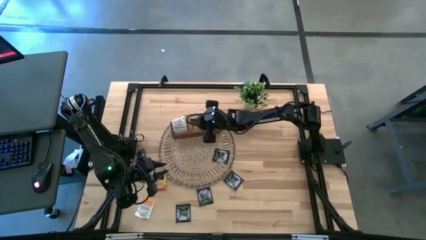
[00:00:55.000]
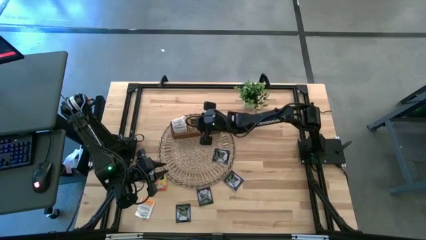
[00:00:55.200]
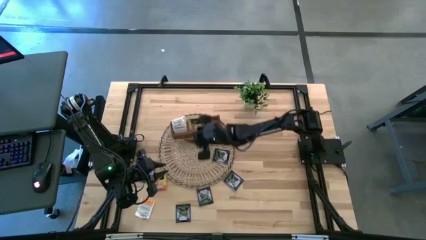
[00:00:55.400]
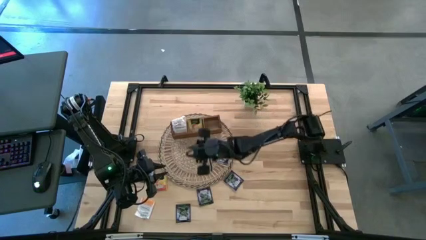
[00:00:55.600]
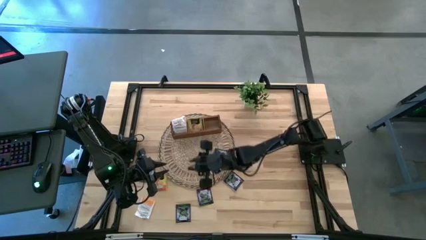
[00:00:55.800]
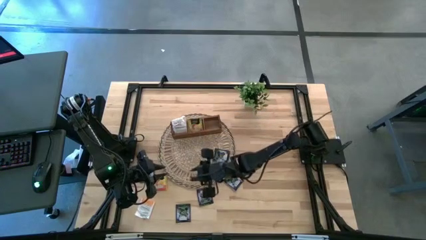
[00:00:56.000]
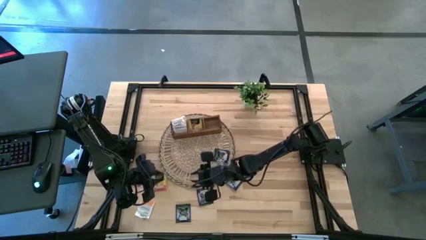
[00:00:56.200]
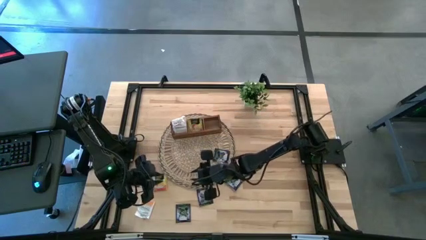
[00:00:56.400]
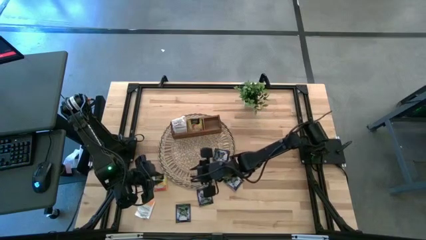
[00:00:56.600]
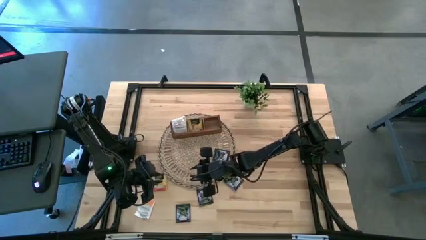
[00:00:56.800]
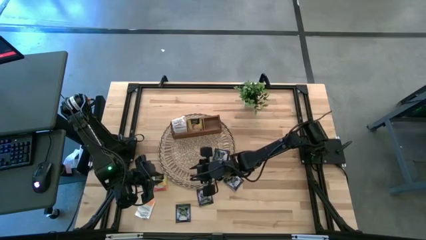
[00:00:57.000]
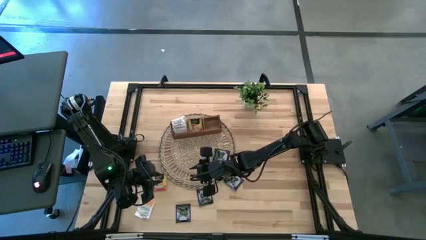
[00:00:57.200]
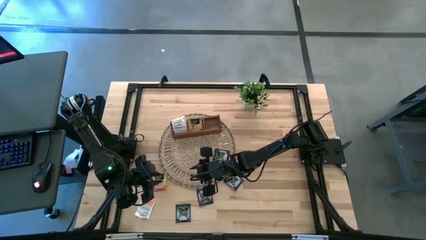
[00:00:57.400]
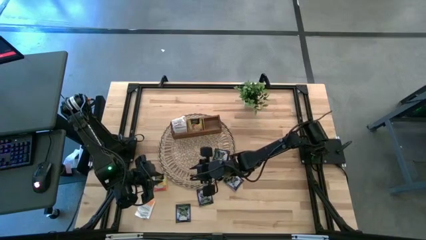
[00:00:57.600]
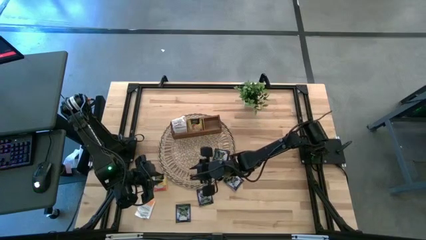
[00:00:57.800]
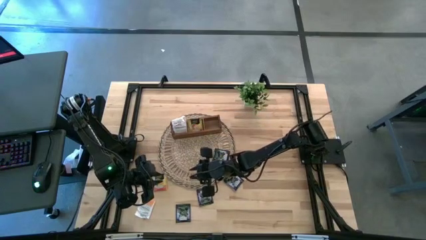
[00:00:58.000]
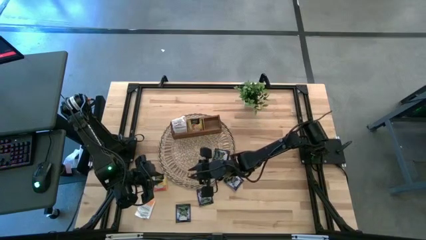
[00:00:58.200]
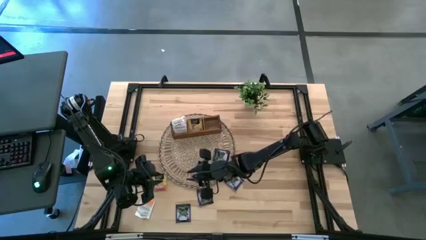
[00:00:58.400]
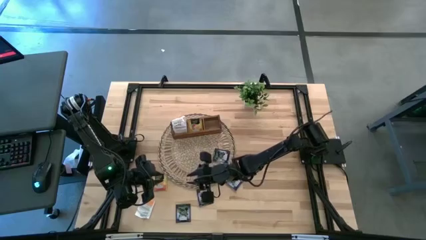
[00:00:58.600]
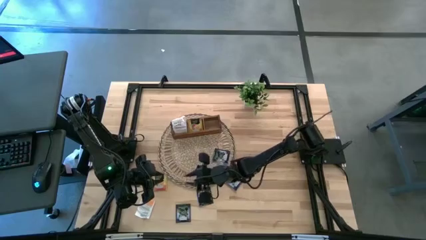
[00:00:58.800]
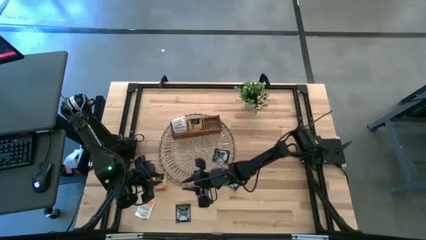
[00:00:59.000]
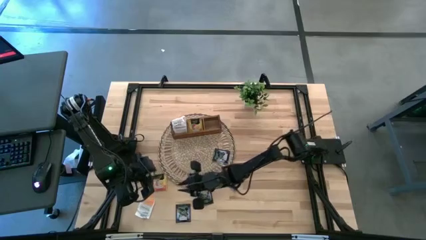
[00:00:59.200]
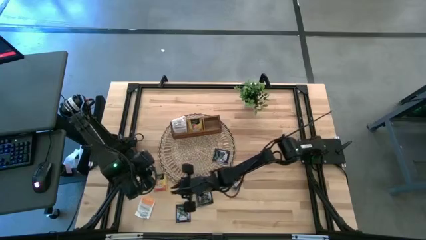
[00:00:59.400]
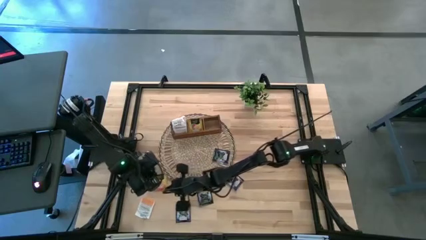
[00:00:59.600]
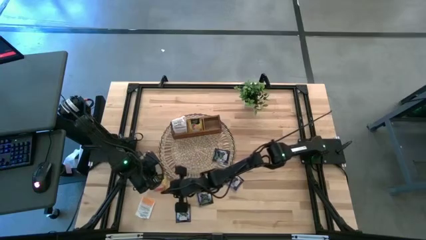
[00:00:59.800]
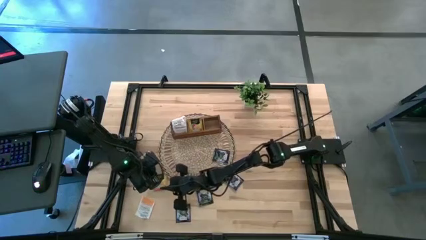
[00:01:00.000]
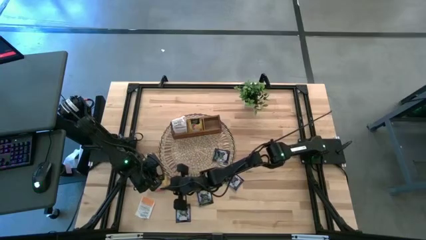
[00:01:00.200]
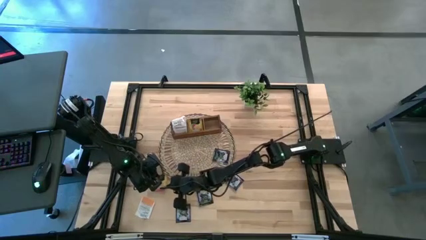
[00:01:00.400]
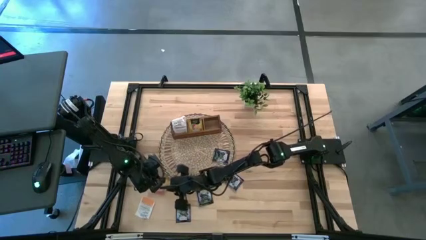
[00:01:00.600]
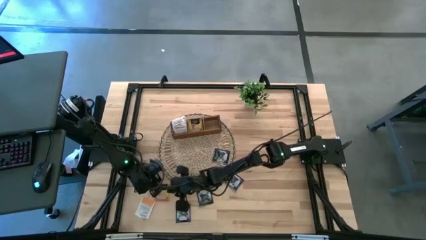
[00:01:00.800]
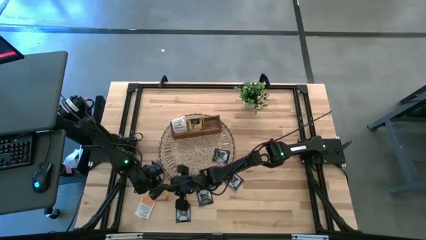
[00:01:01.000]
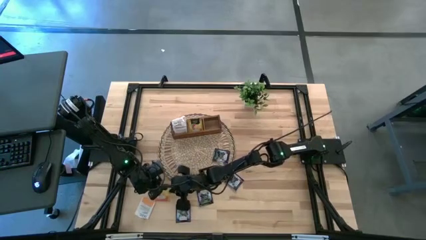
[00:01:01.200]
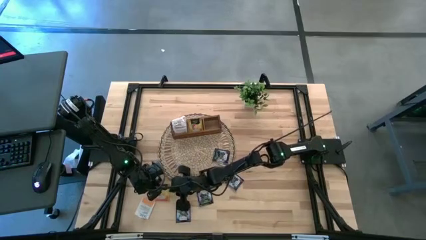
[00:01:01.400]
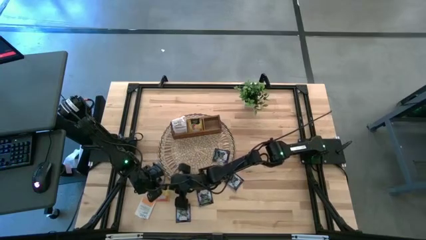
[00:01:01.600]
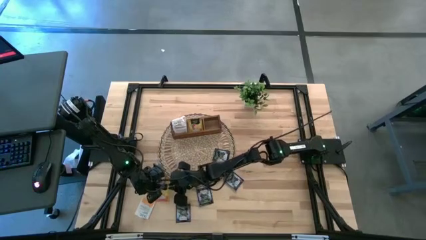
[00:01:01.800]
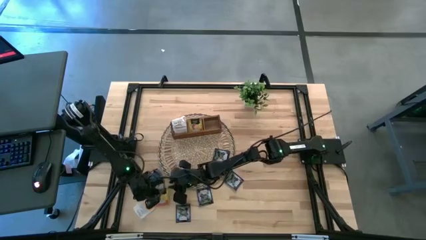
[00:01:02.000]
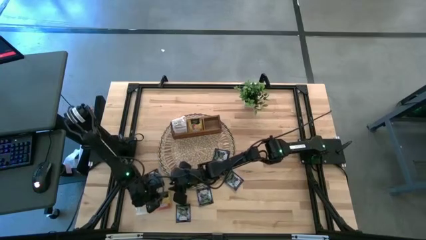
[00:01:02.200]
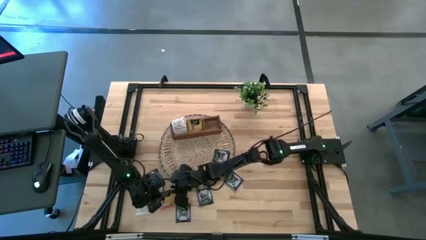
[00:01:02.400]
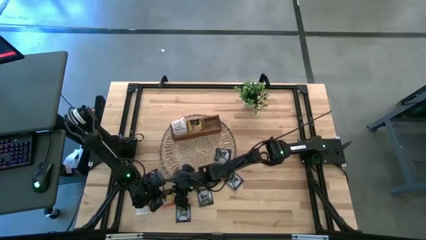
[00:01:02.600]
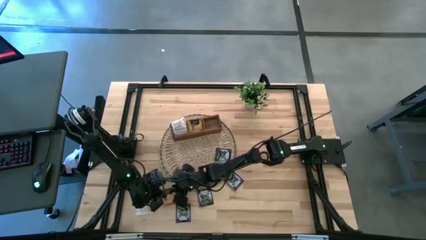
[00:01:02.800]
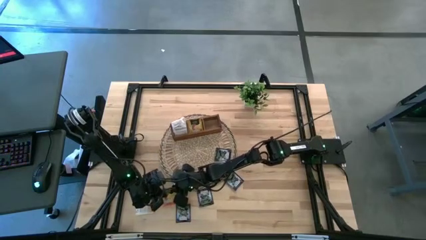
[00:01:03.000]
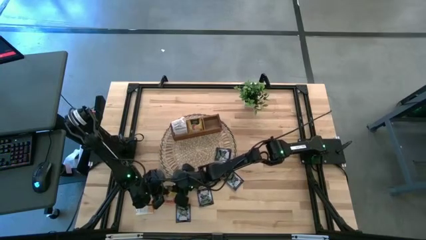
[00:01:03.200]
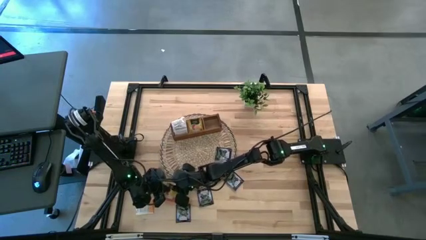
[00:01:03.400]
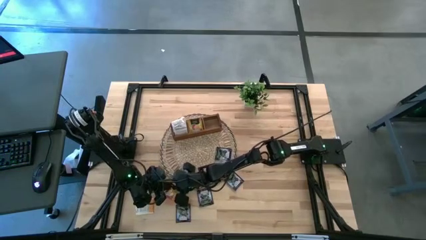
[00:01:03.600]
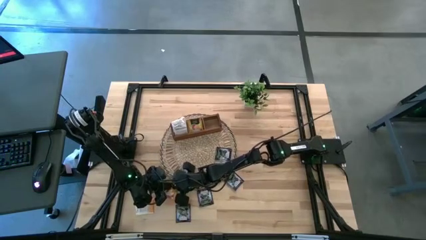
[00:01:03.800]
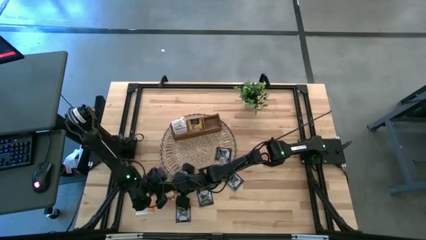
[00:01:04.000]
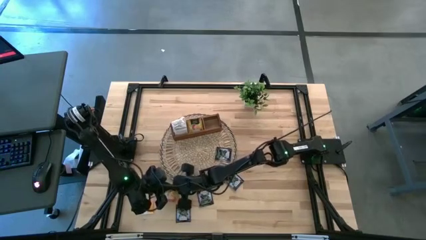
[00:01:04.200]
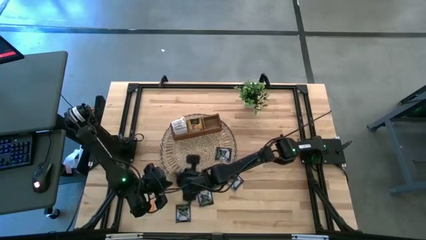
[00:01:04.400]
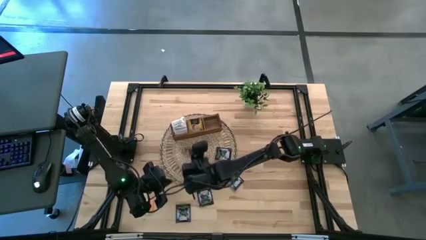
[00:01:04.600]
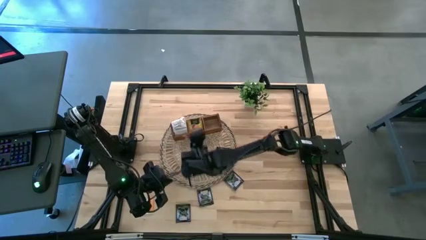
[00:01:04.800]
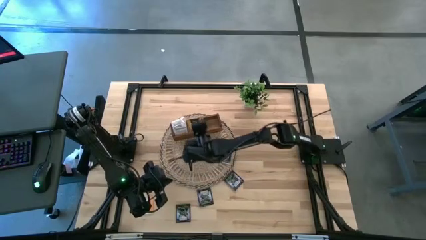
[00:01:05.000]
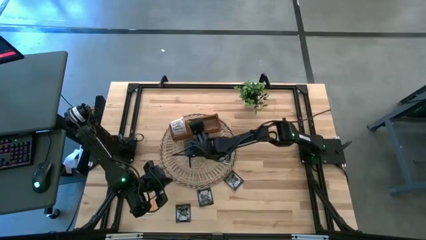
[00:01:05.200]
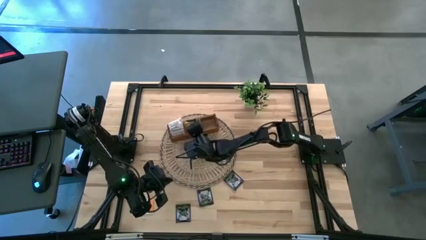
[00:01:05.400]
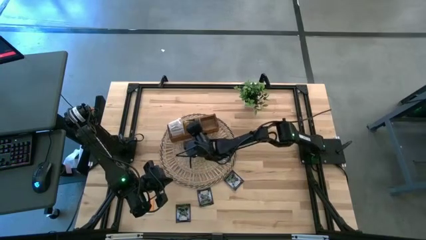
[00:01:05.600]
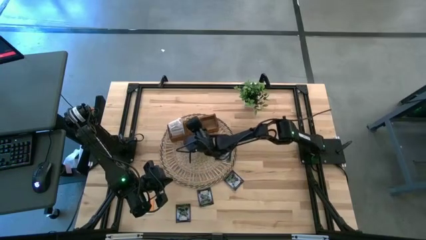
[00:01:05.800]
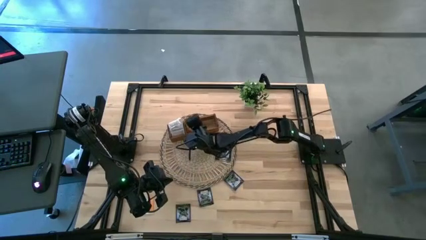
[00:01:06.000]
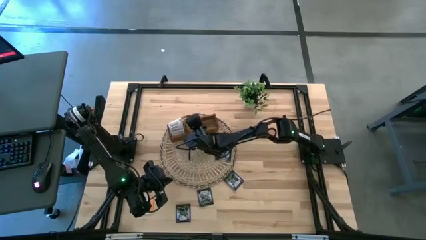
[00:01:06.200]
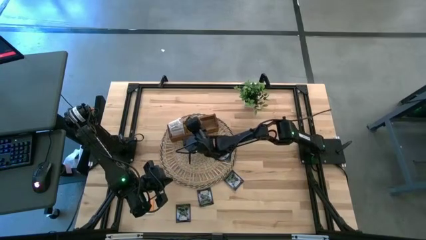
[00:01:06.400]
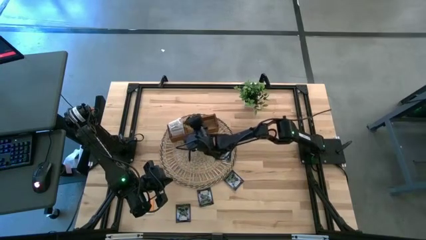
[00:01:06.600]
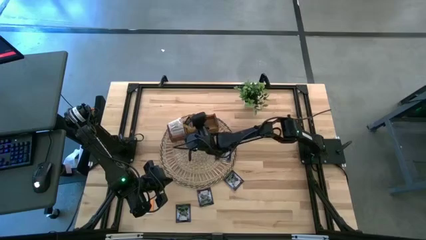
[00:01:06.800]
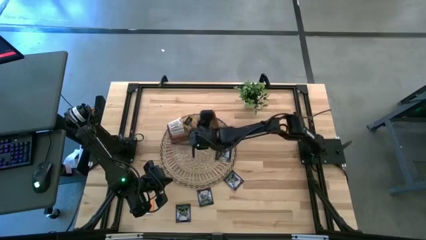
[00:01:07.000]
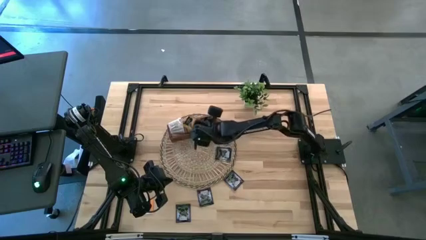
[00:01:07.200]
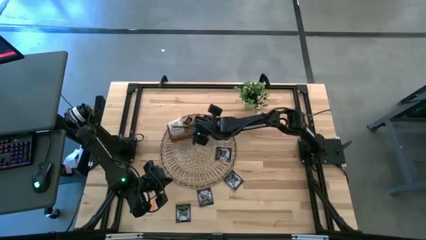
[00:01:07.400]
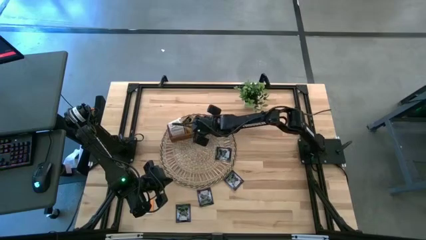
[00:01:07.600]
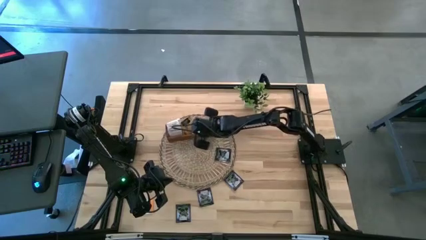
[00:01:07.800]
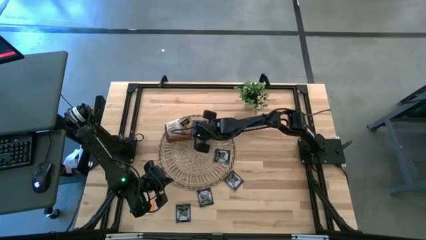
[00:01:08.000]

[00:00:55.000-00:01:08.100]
Task: Pick & Place Tea
Put the orange tea packet into the middle compartment of the wooden organizer
